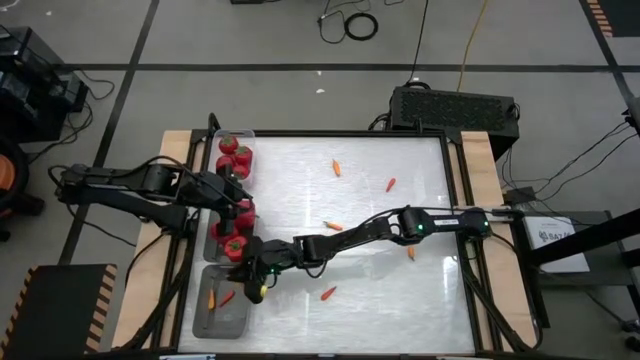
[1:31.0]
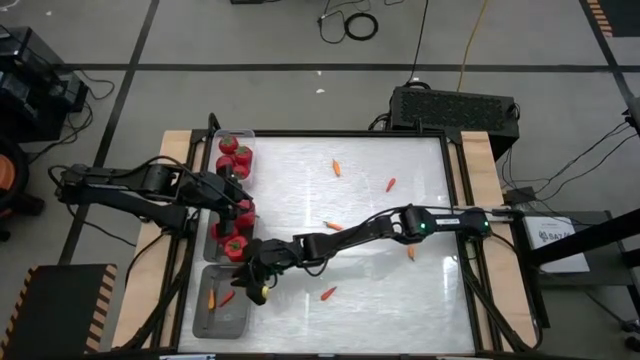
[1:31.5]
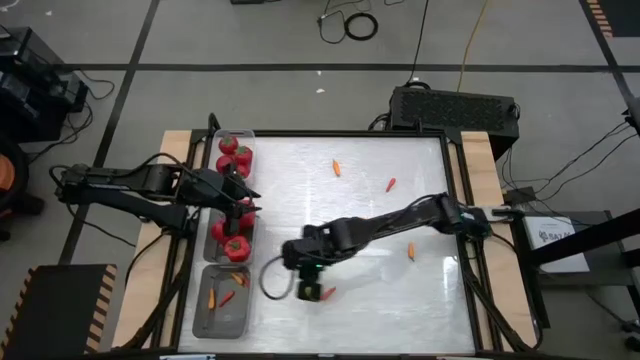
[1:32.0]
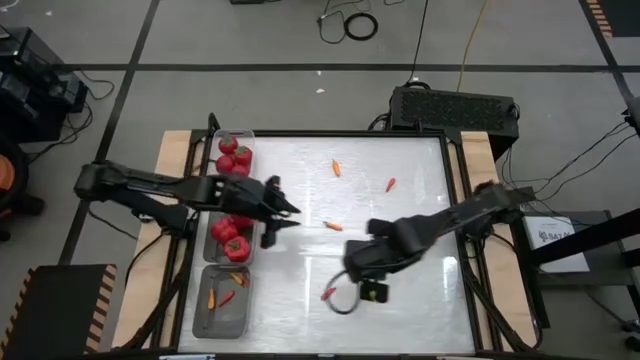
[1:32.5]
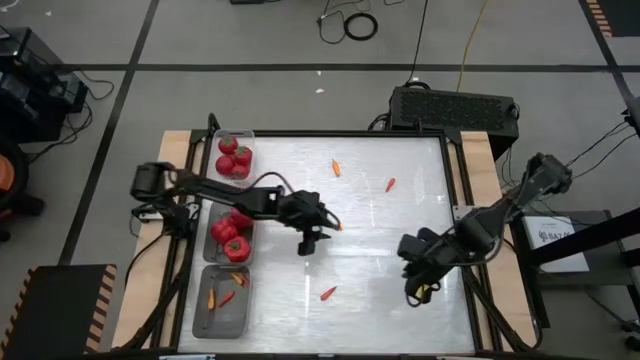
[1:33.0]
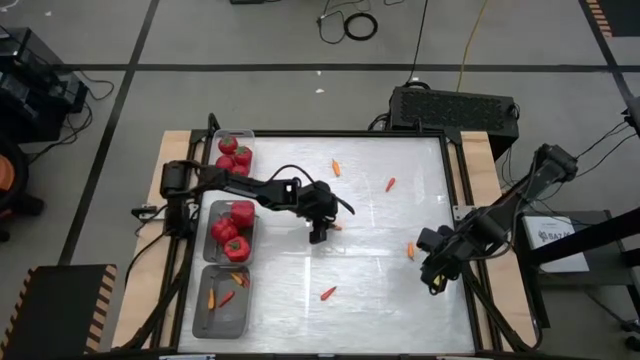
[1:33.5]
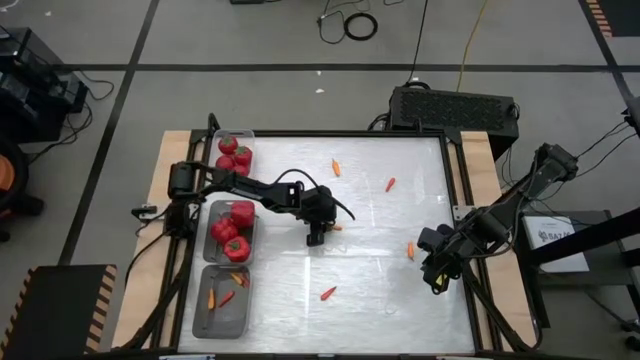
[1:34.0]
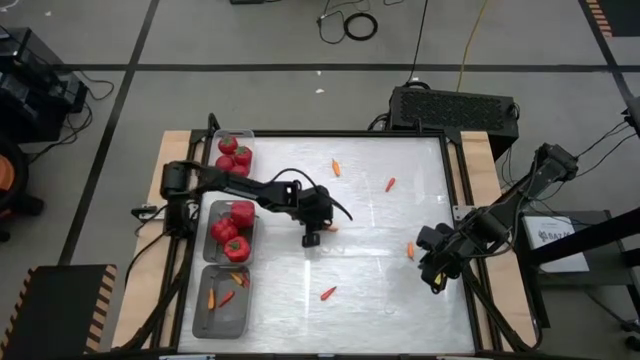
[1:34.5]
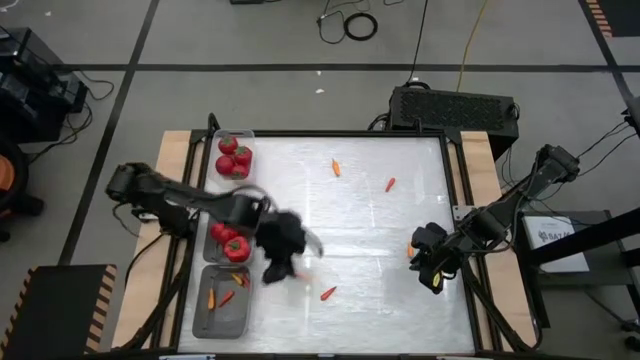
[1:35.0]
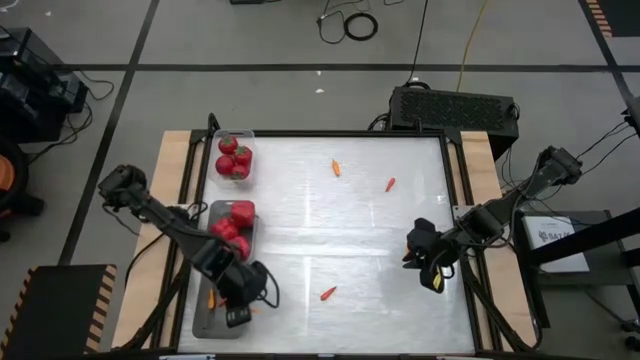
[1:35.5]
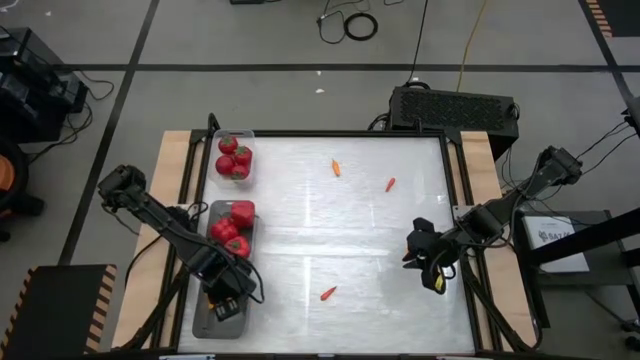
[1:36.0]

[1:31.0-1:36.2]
Task: Sort produce into baskets
Put the yellow chili pepper into the bottom black bin

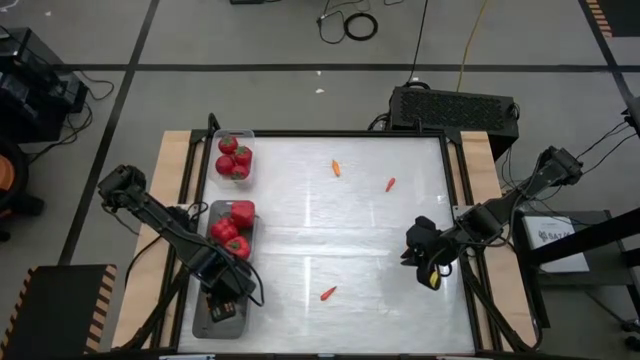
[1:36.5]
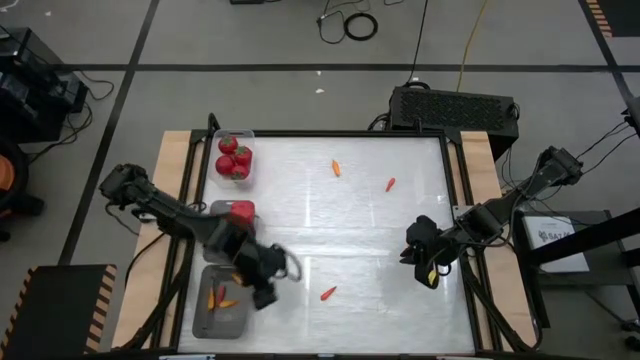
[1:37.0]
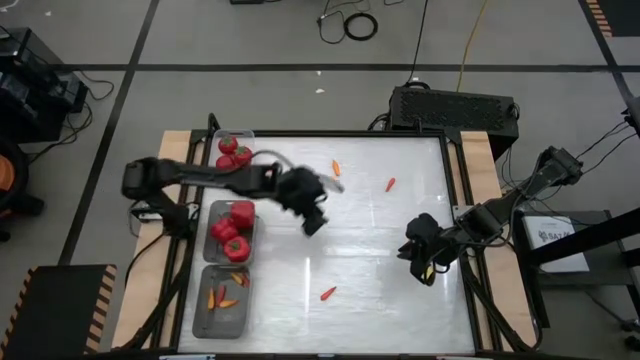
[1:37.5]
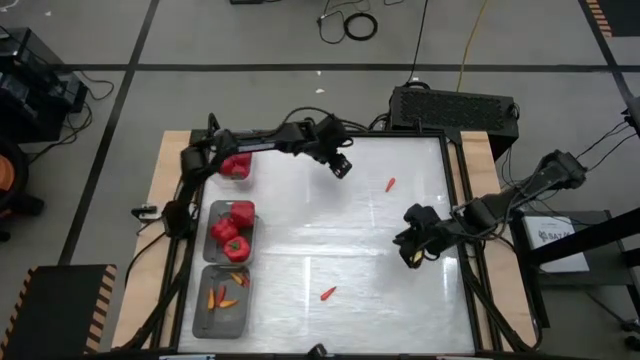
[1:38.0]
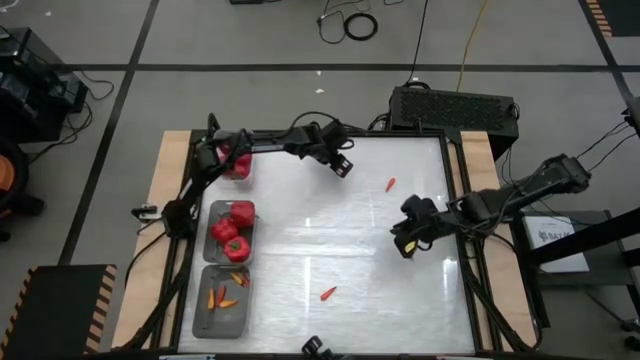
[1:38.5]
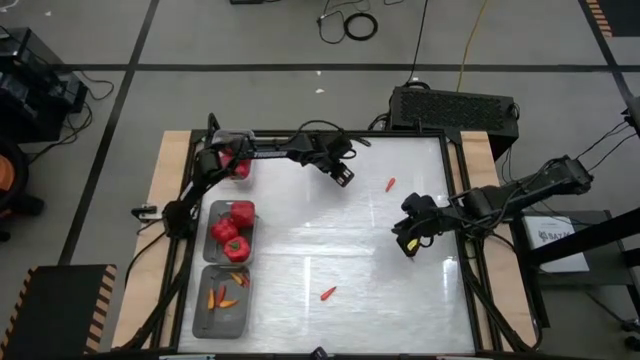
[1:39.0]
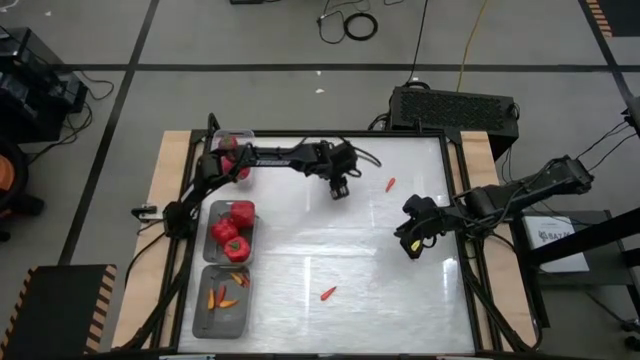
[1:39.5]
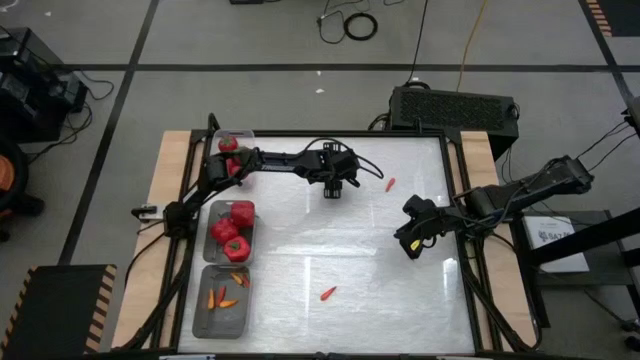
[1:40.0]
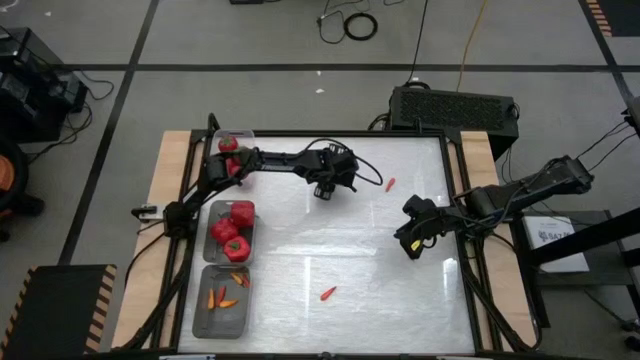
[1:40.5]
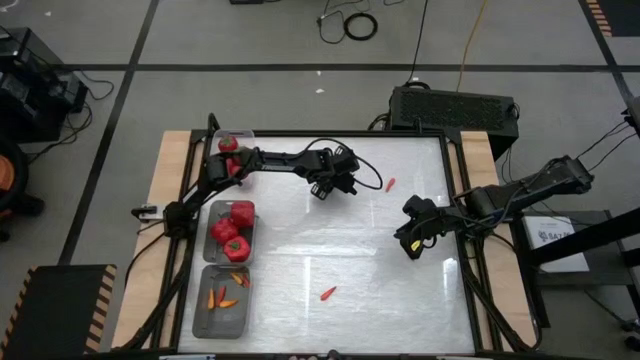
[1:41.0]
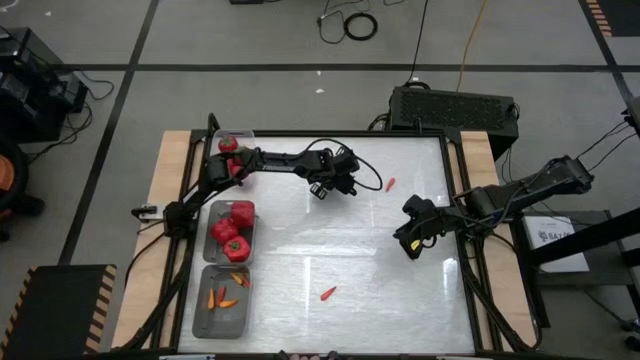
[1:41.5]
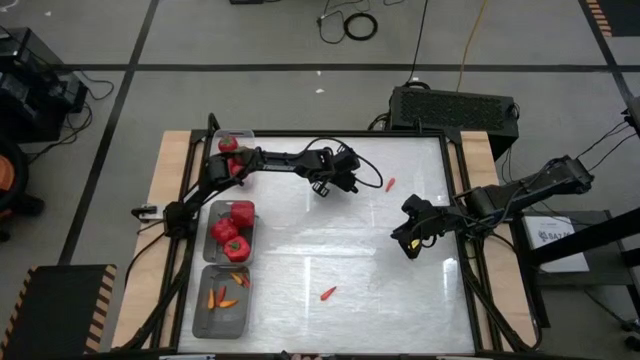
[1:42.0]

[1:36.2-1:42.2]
Put the yellow chili pepper into the bottom black bin

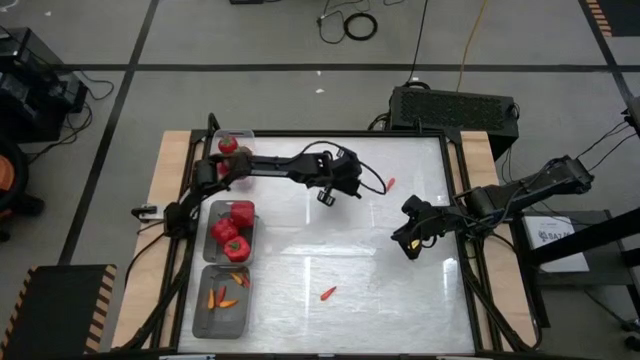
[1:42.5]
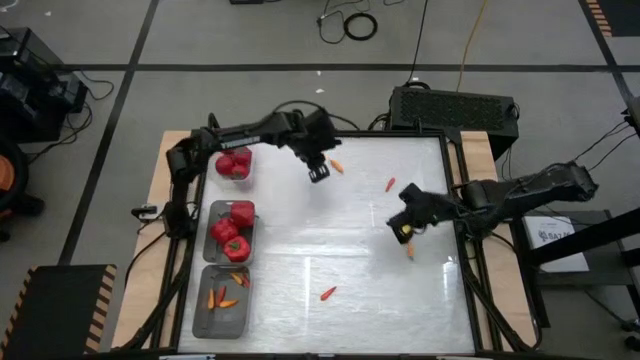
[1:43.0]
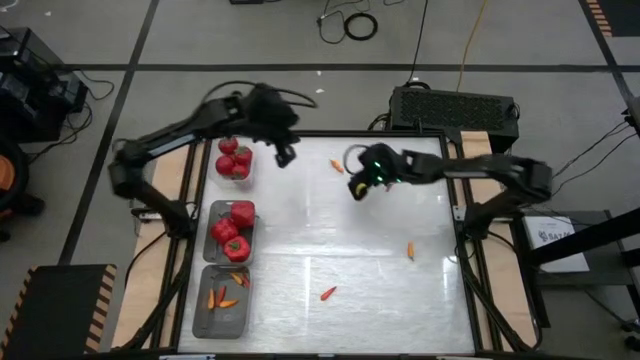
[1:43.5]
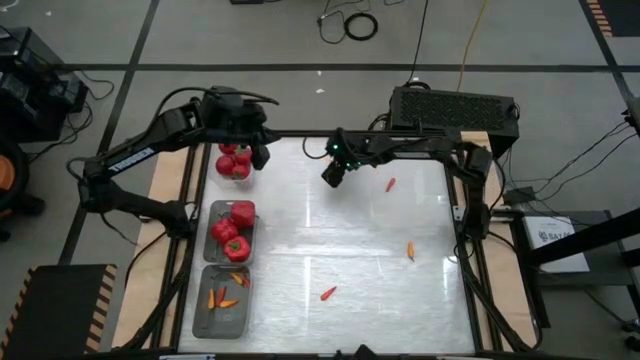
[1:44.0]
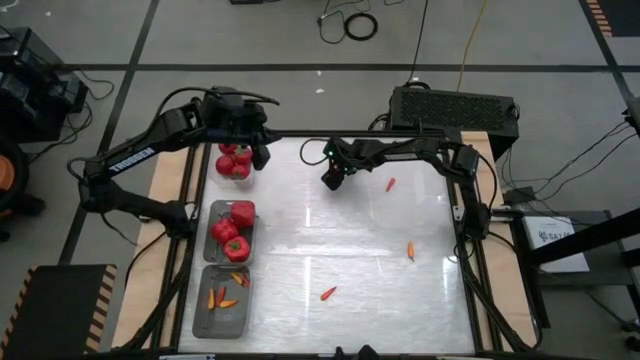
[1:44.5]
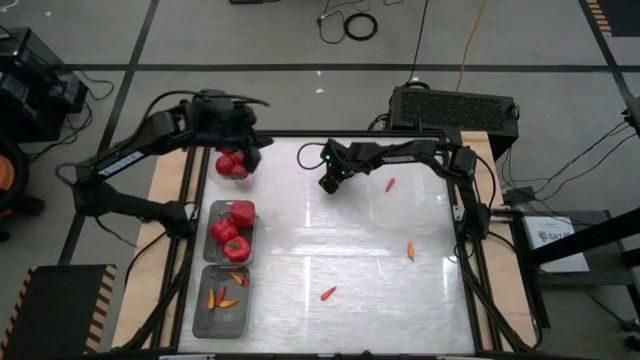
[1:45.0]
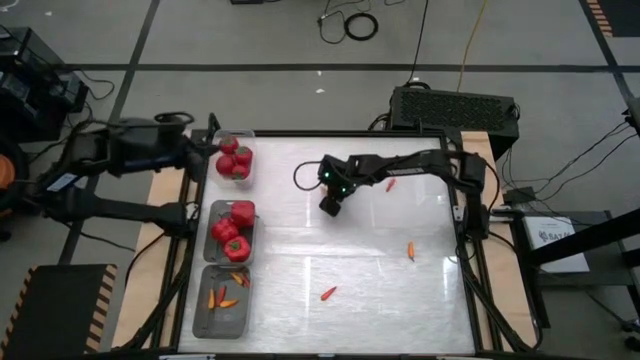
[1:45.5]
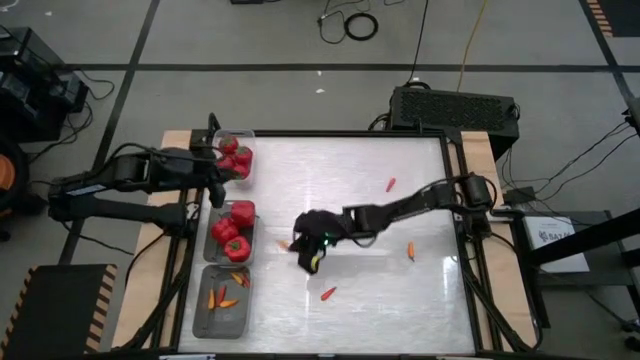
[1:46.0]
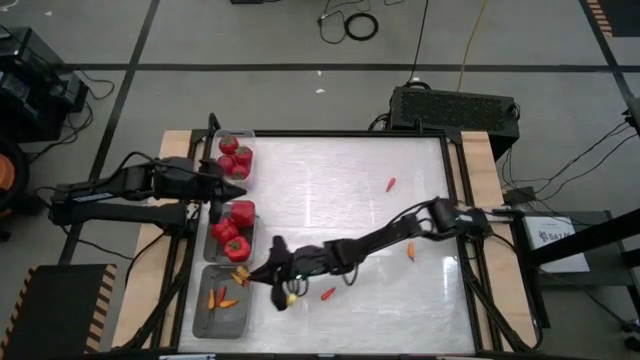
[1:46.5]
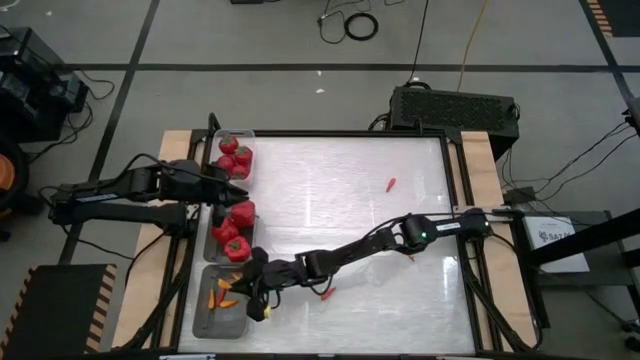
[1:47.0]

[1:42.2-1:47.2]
Put the yellow chili pepper into the bottom black bin

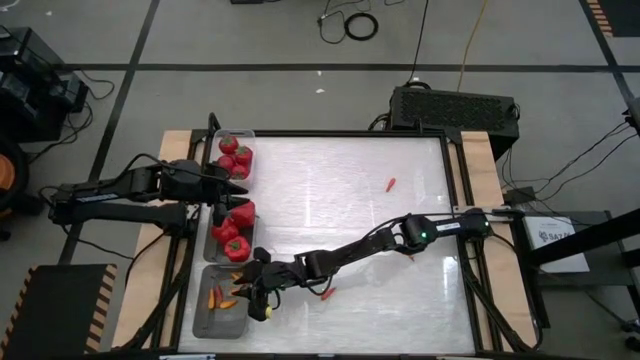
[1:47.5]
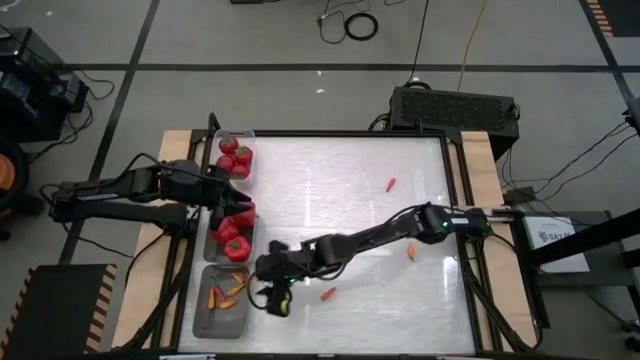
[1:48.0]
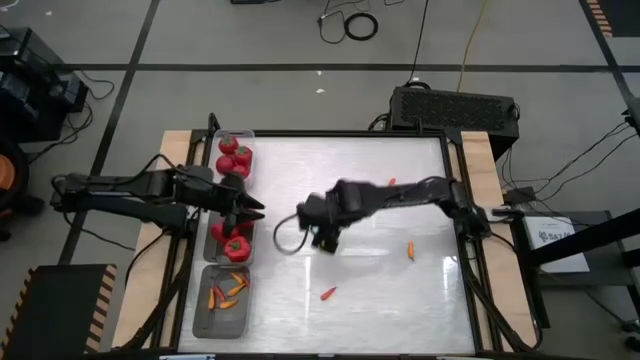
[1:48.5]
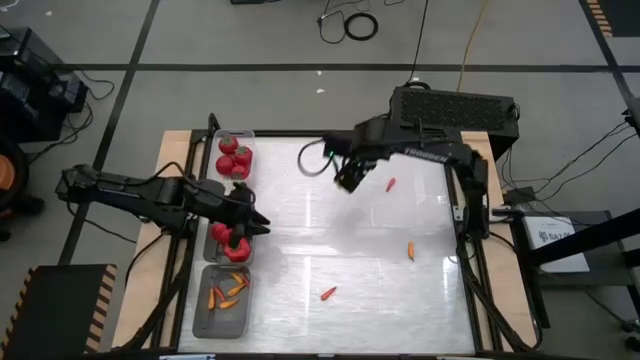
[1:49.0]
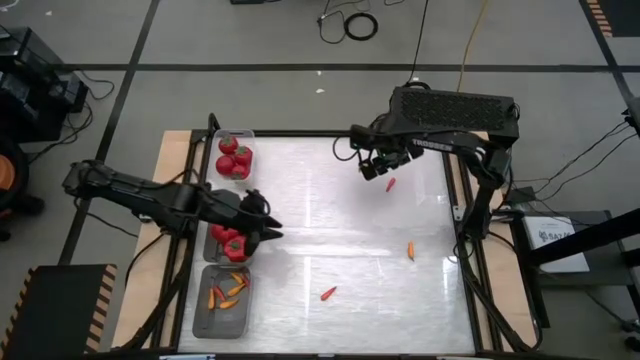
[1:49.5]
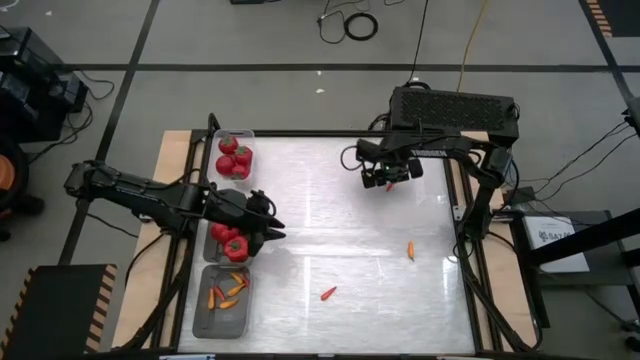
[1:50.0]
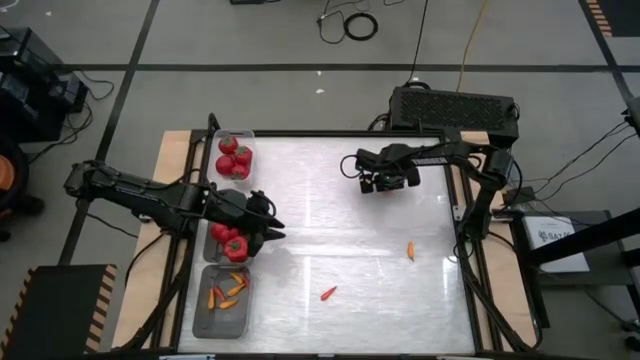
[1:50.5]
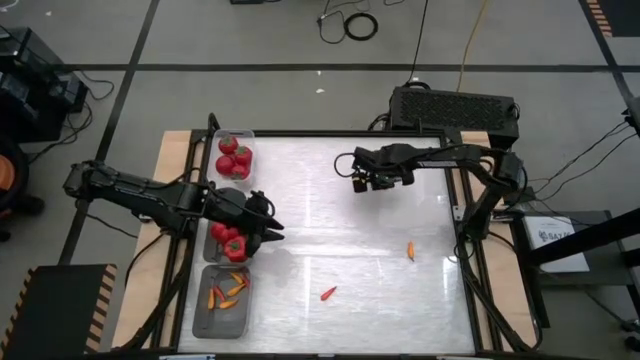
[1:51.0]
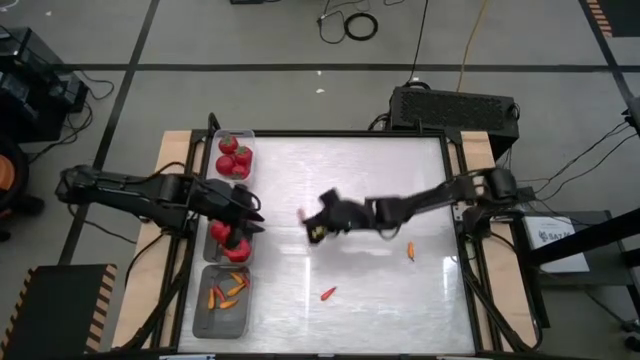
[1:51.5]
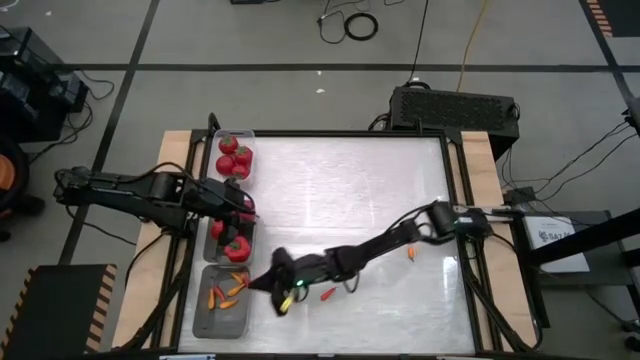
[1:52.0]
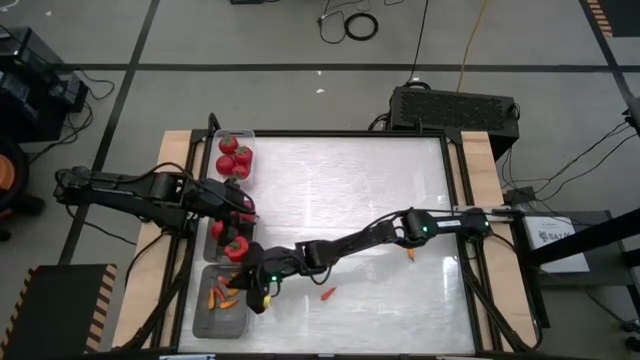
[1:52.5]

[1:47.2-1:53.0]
Put the orange chili pepper into the bottom black bin
